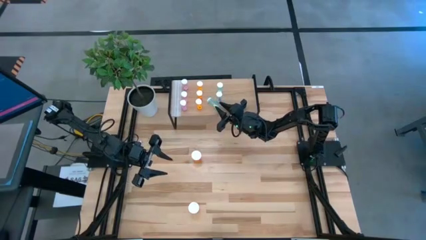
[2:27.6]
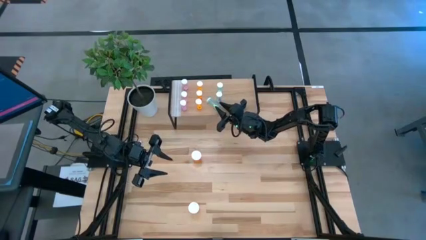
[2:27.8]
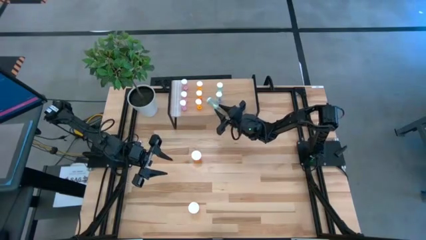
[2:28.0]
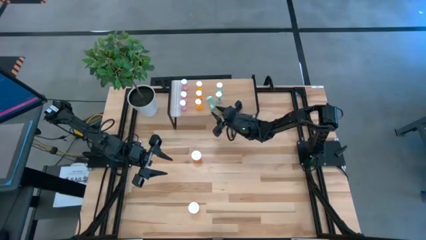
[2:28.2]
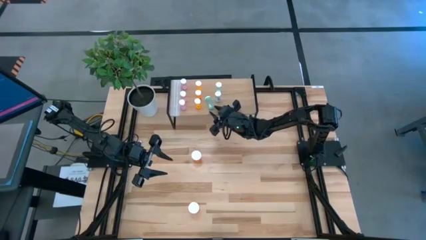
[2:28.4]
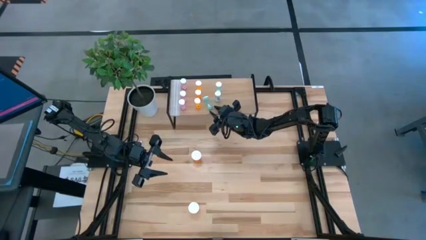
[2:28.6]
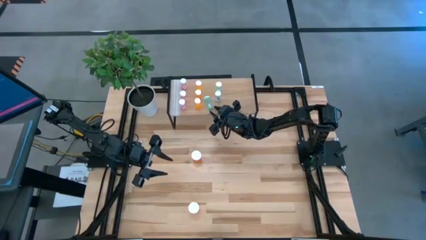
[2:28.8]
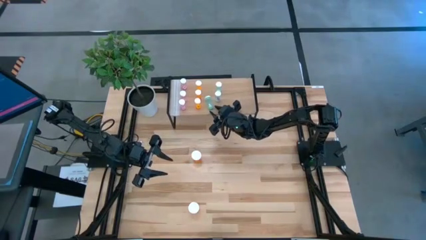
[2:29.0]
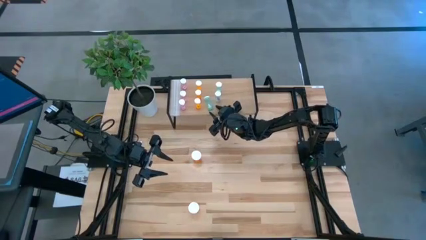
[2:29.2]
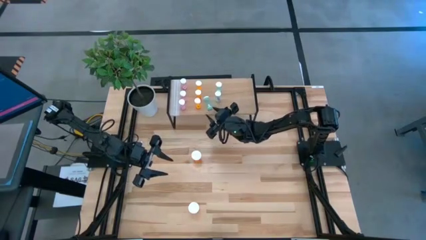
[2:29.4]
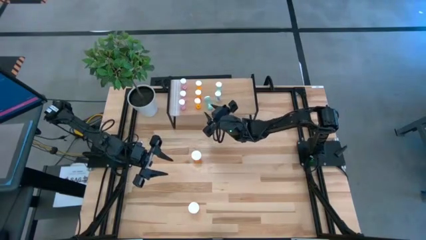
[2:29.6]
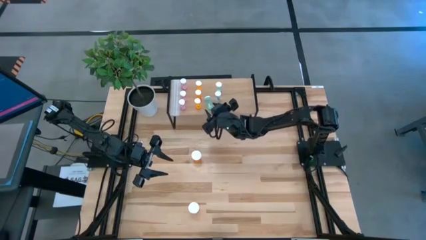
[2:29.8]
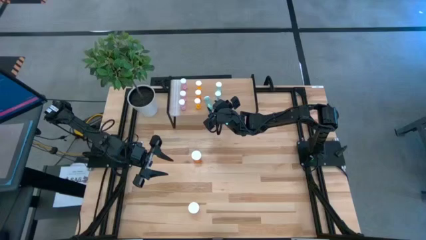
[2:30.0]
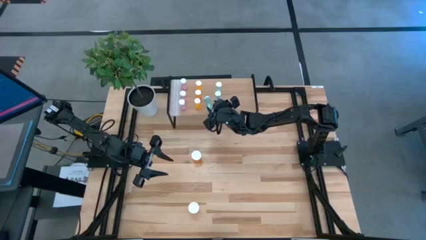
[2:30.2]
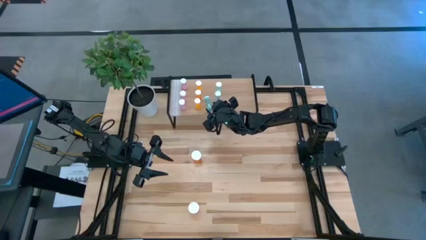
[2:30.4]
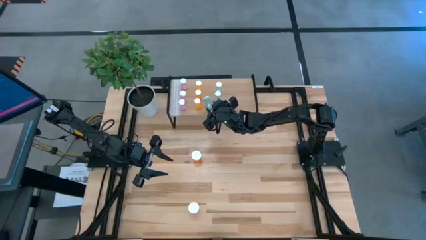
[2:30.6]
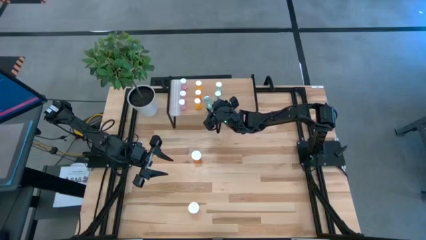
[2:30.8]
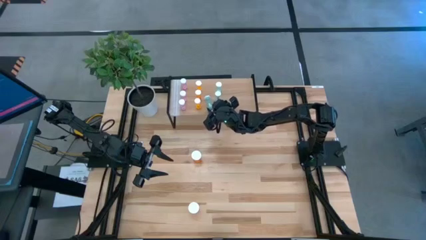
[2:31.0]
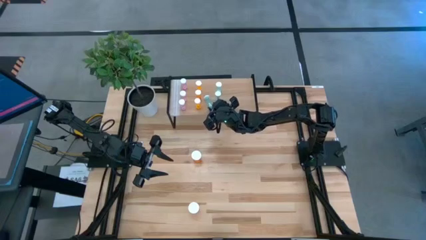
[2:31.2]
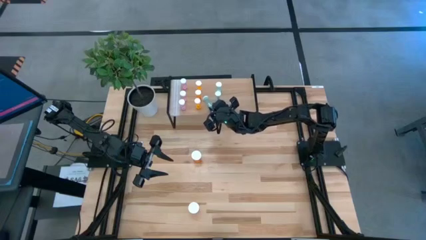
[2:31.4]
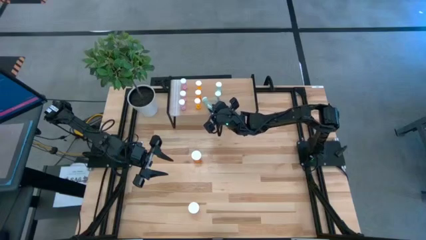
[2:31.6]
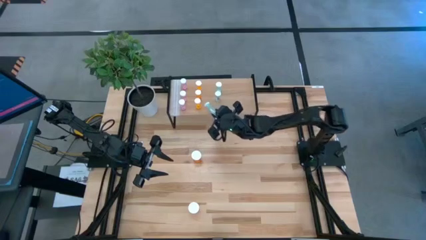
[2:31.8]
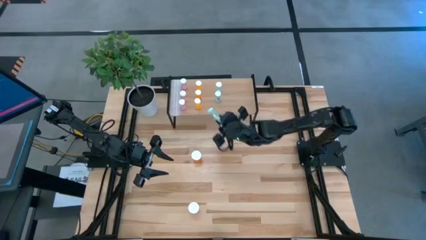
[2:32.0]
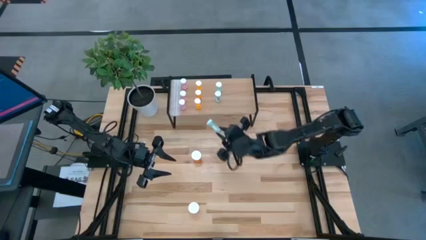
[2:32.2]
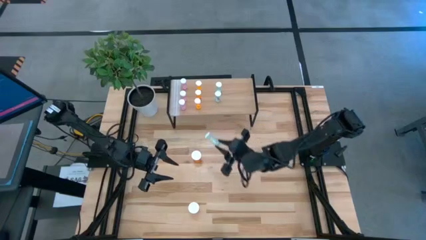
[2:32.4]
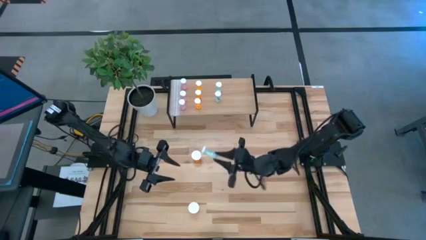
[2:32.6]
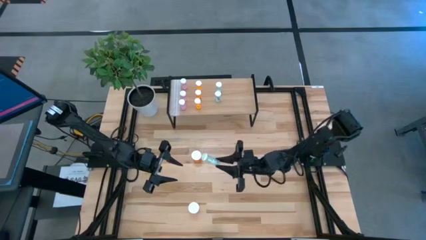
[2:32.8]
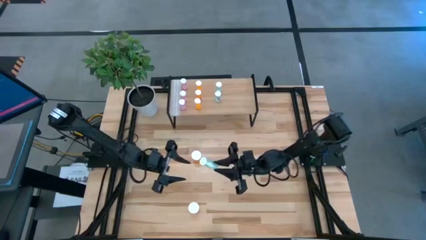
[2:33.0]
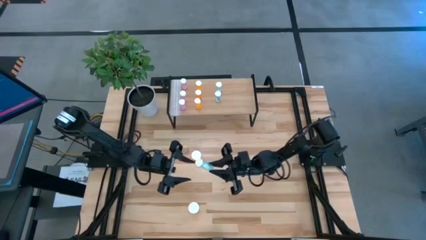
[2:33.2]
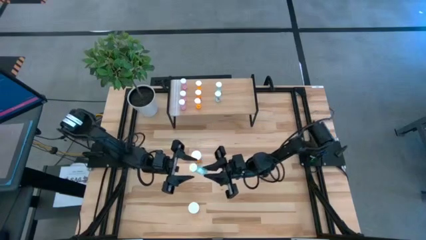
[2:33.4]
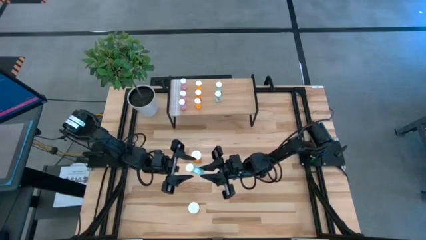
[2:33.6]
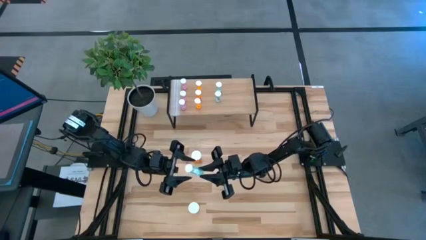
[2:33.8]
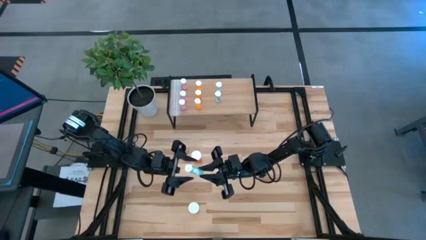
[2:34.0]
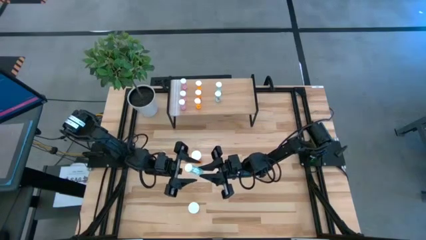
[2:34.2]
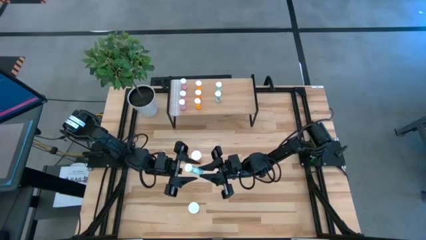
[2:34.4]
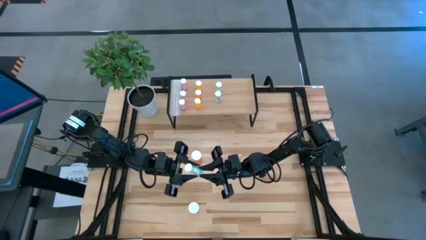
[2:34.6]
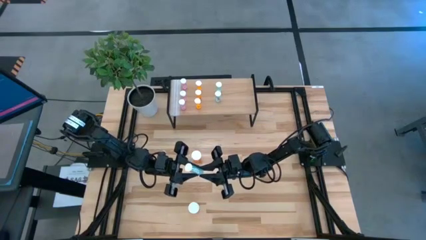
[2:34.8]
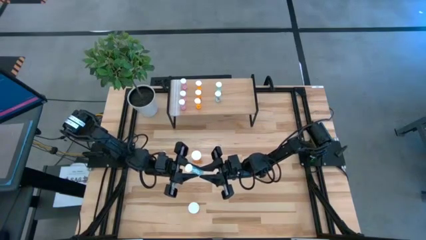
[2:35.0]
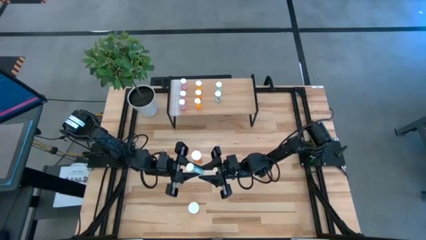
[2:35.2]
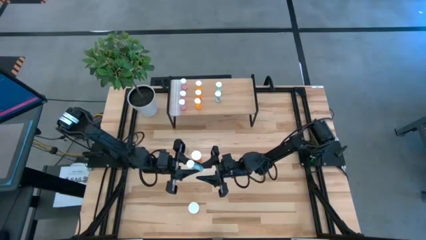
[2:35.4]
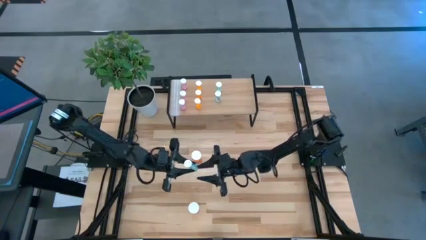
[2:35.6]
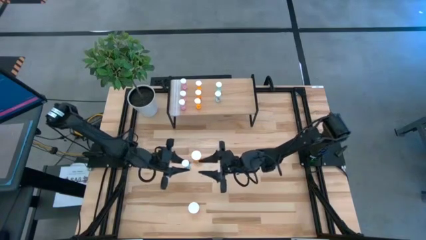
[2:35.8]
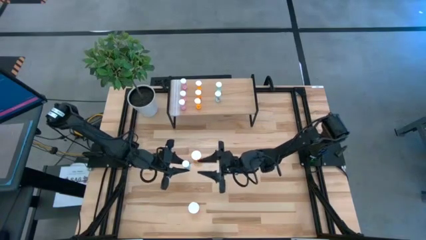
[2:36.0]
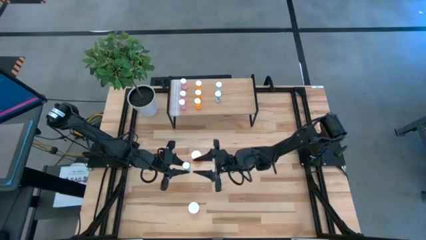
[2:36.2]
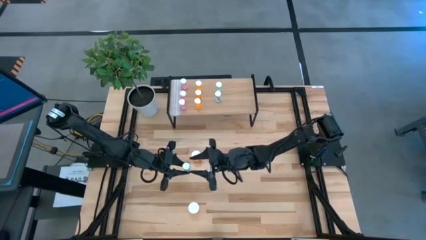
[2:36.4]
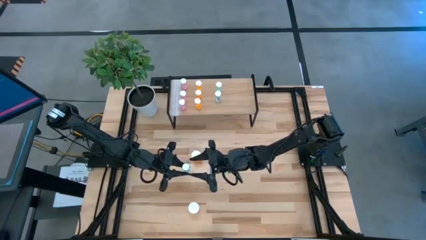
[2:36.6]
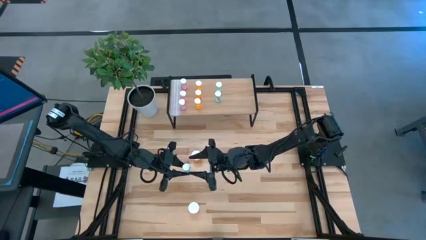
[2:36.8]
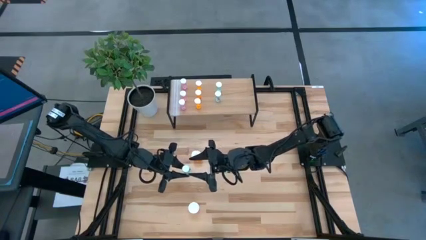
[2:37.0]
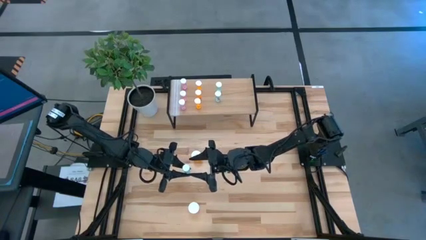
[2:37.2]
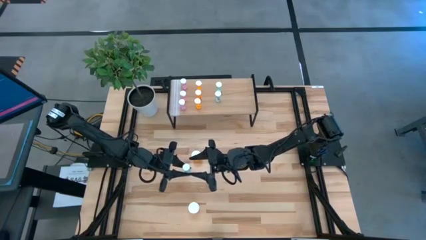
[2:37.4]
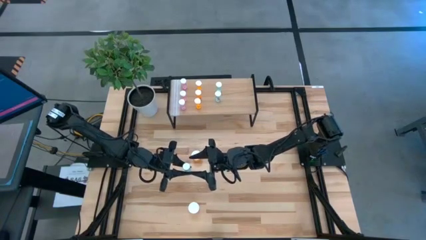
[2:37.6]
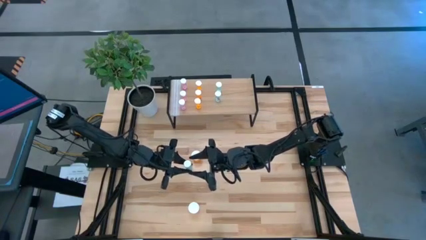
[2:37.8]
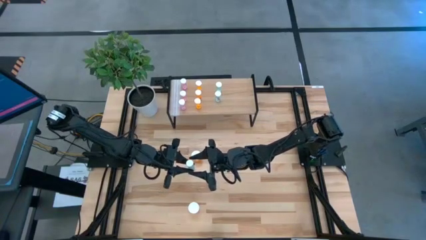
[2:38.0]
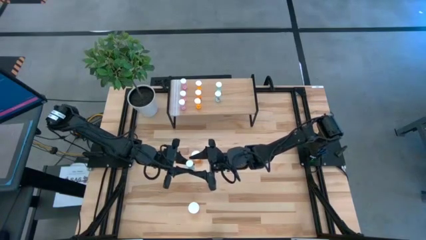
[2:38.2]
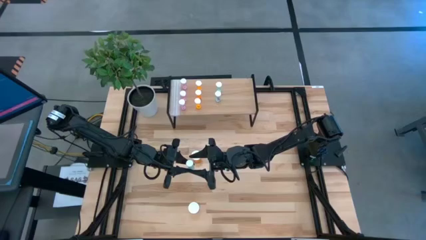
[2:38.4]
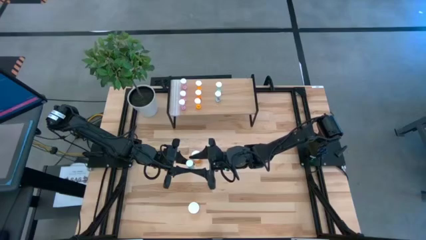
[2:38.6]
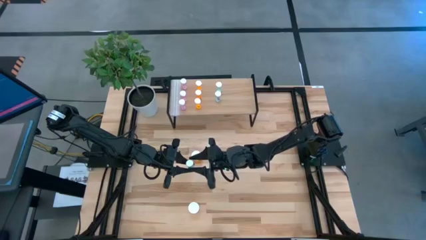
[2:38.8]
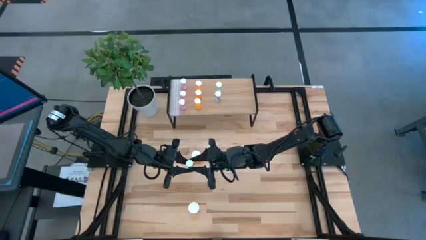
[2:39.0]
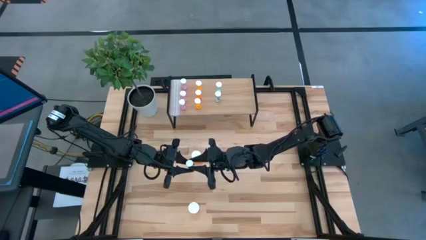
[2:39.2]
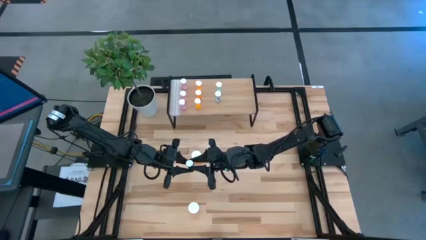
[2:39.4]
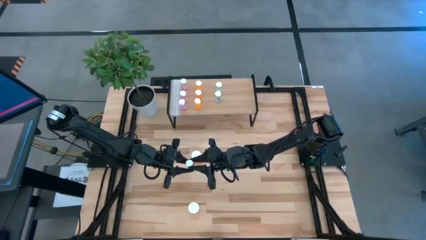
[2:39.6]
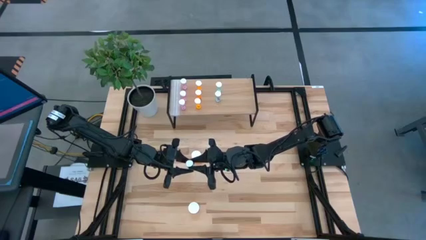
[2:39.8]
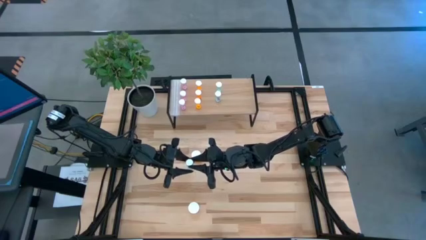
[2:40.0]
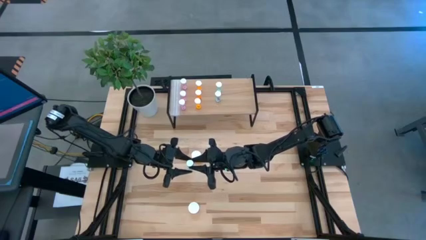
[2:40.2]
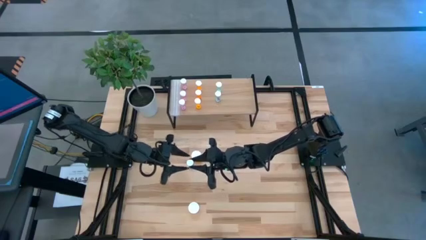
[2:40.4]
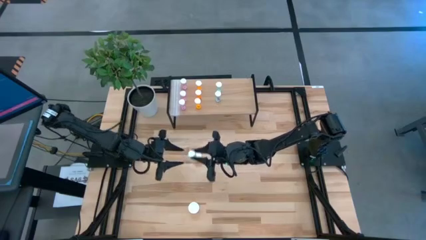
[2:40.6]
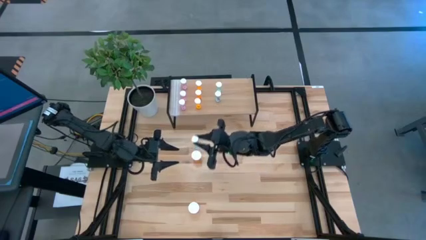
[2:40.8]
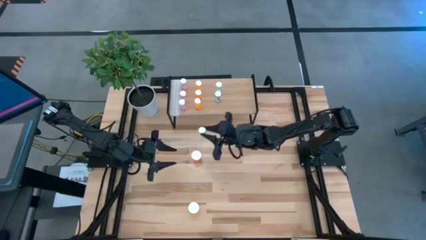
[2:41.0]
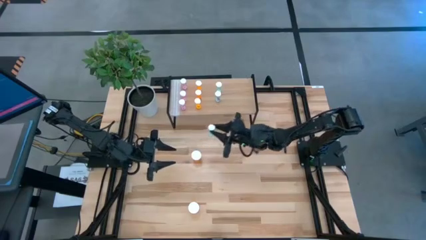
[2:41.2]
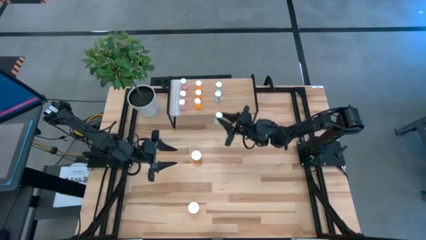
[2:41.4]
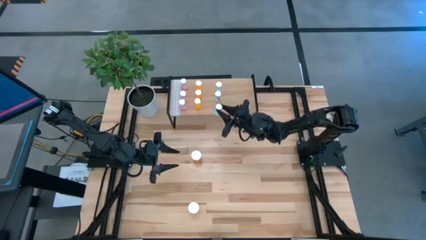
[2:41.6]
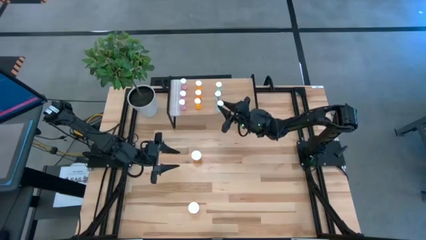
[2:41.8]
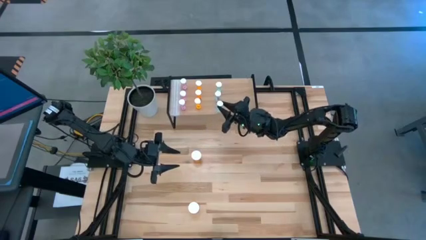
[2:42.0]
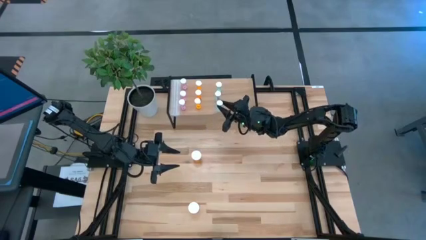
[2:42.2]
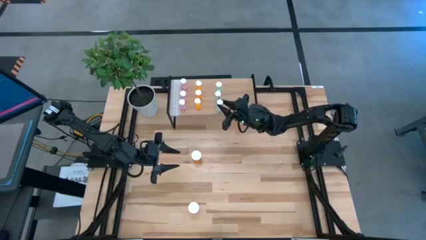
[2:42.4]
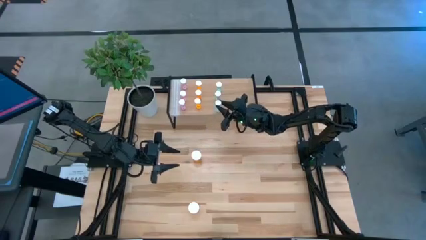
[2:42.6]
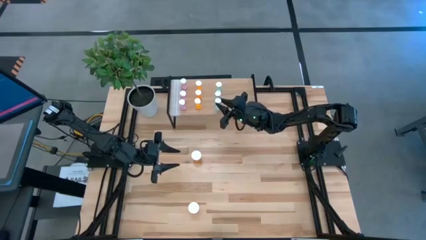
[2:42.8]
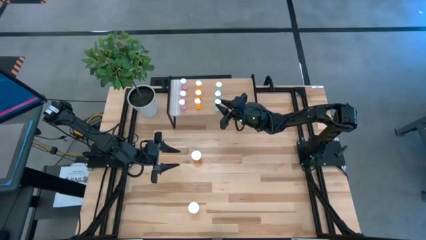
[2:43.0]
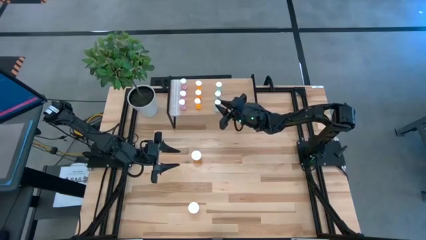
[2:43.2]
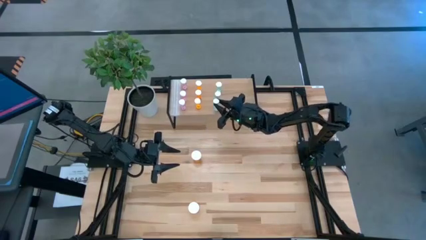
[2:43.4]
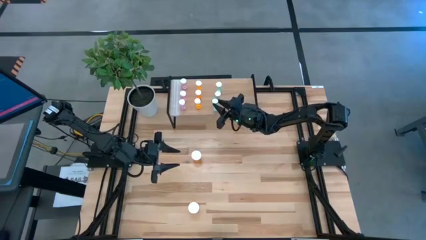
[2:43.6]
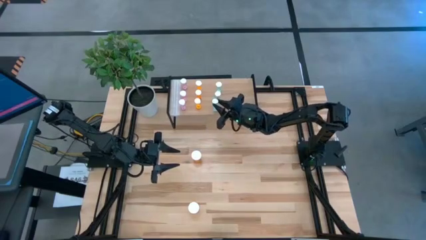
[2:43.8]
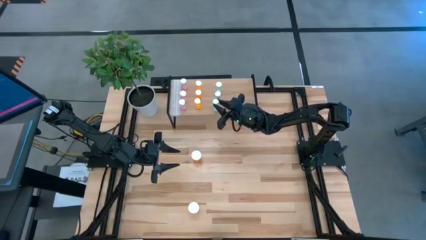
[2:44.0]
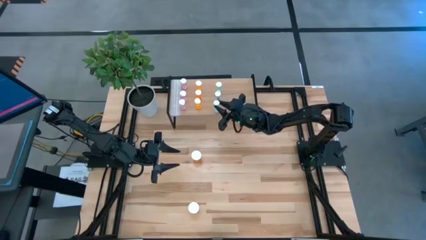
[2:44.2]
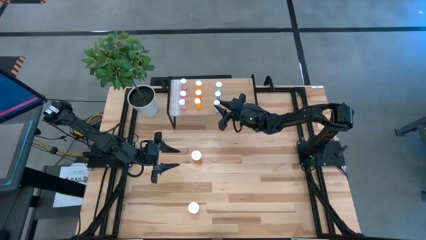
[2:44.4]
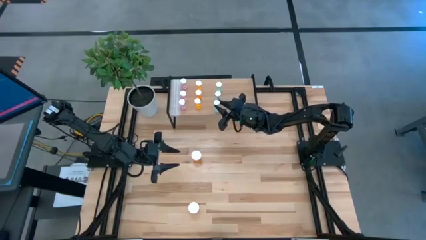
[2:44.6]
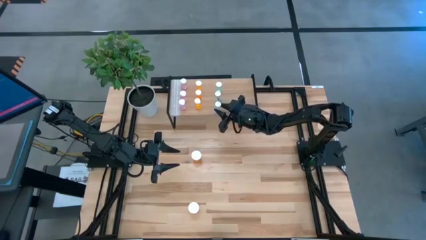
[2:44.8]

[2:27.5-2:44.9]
Task: Pick and place medicine bottles onto shelf by color
Put the blue pill bottle on the shelf aligned with the other blue pill bottles
